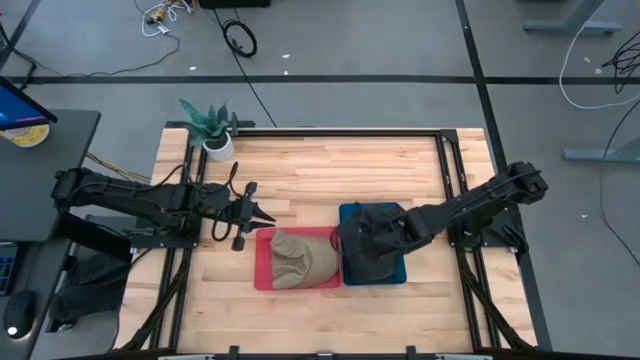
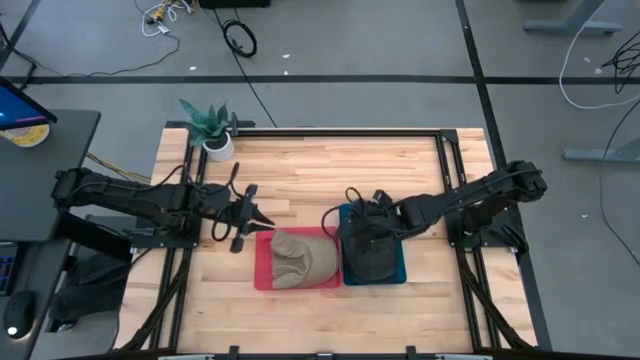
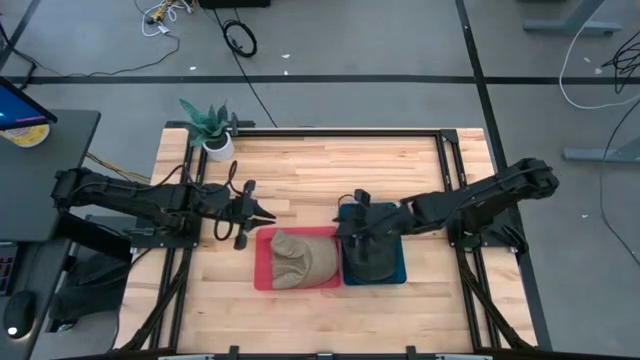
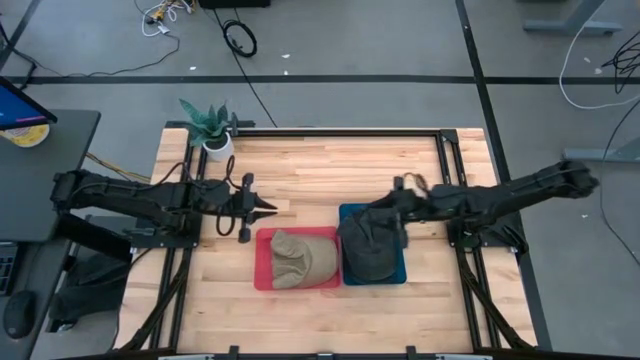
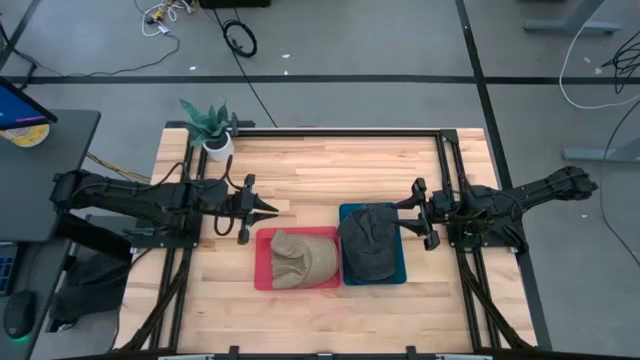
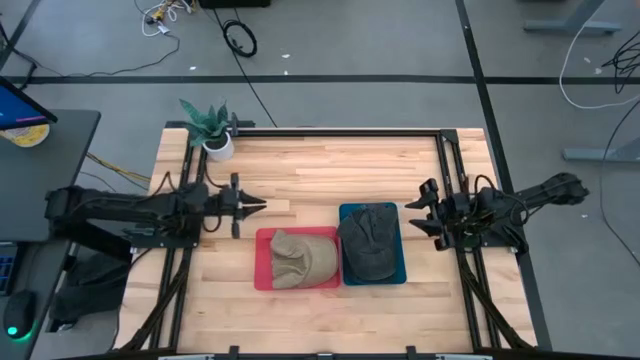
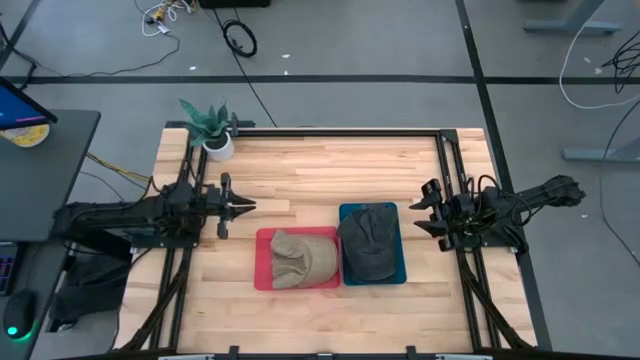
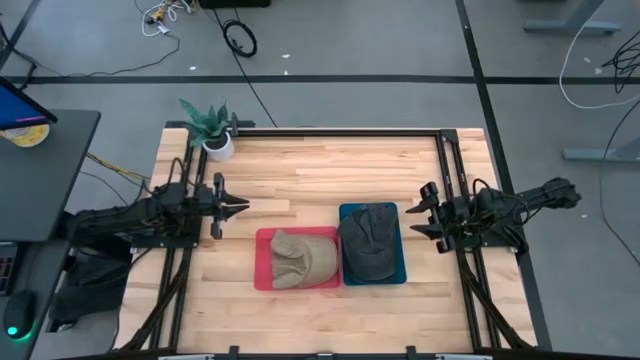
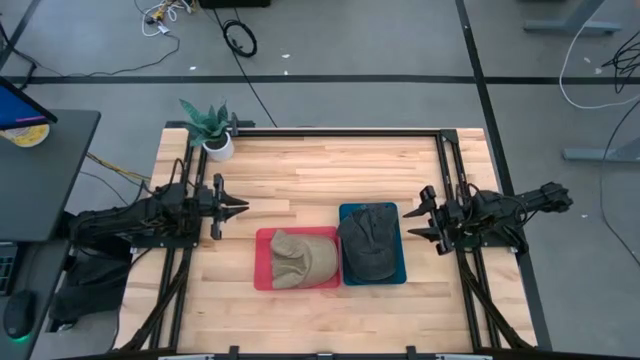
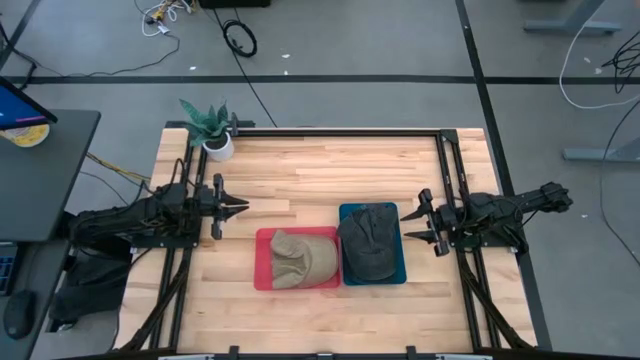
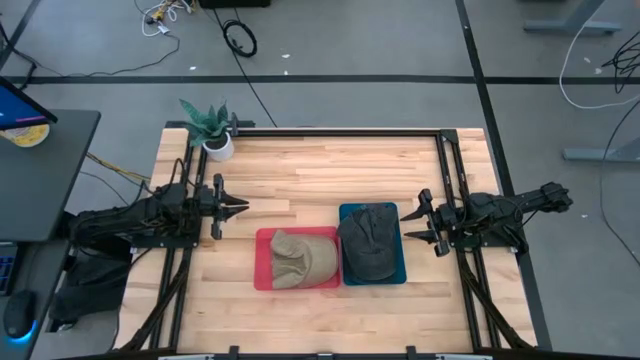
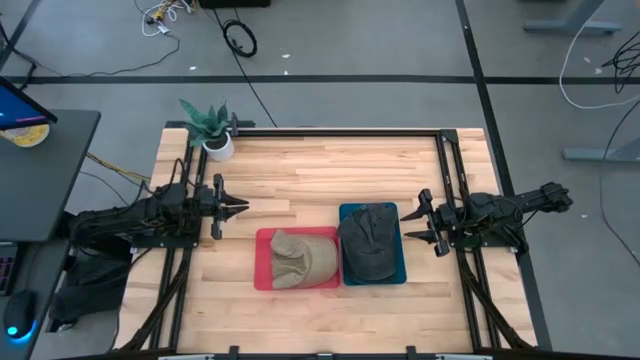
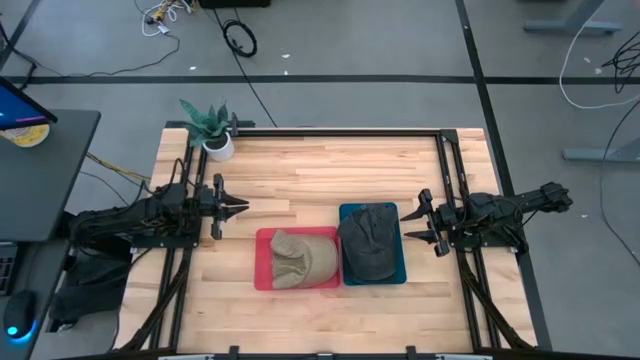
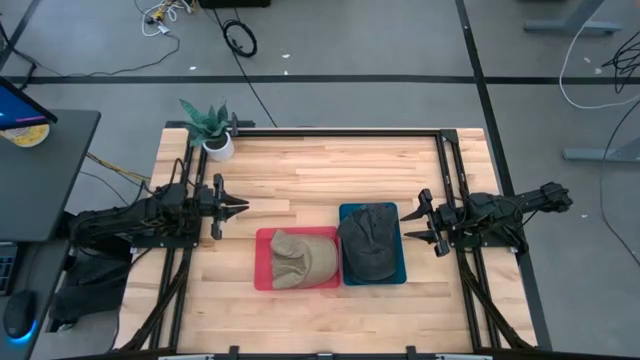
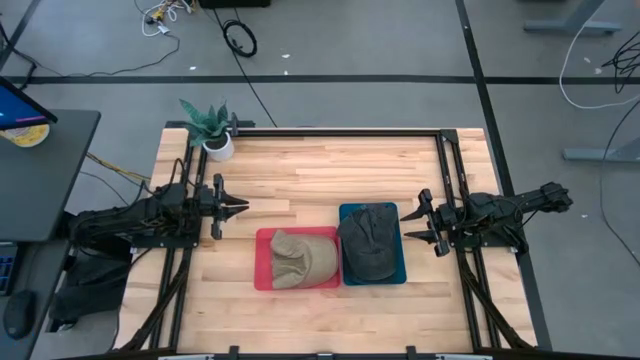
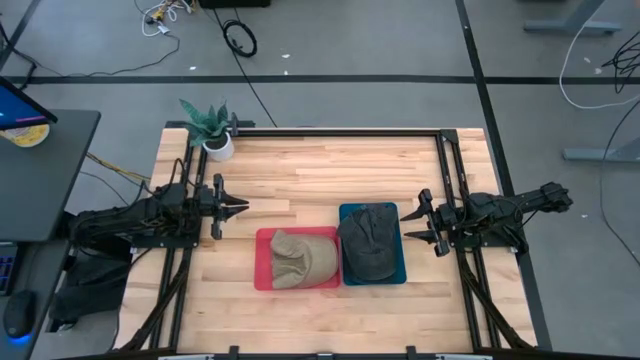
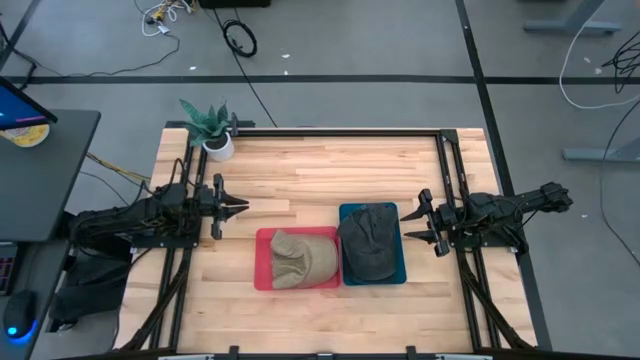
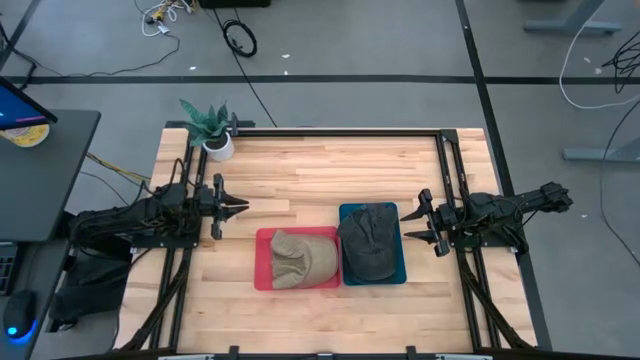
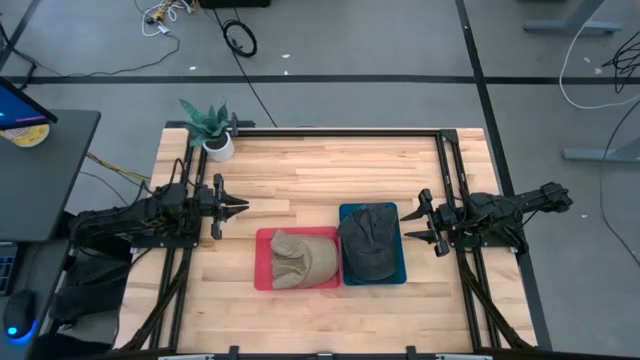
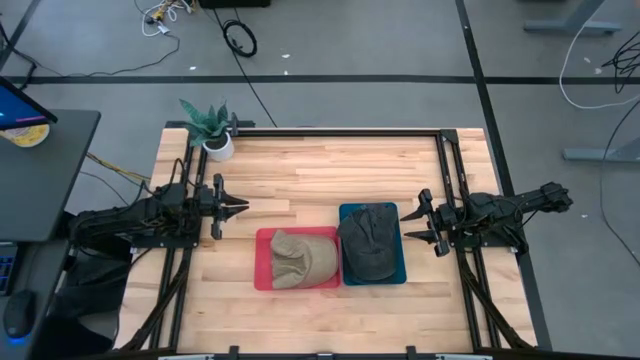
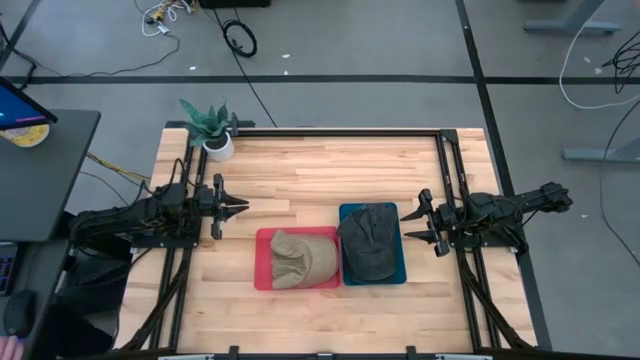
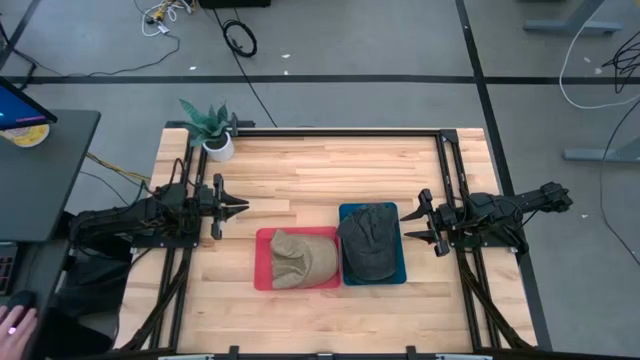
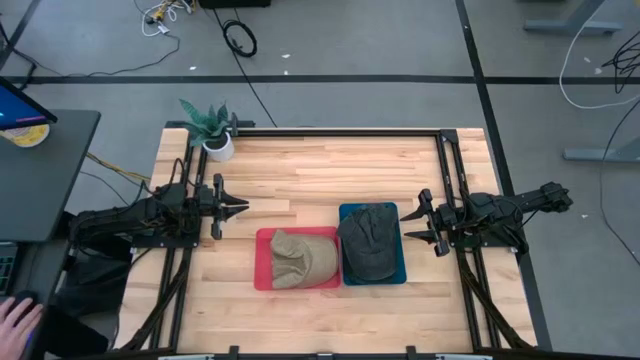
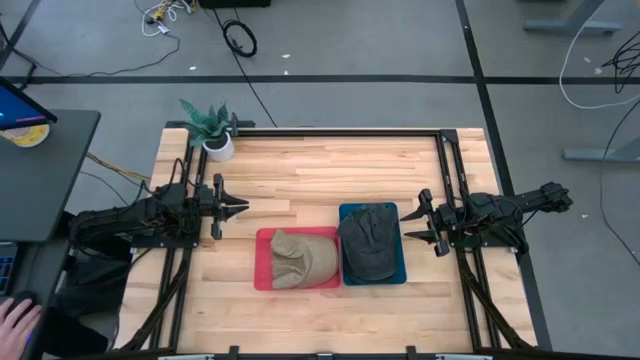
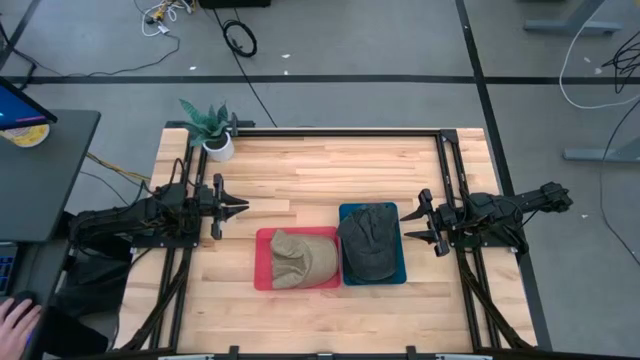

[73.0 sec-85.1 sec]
Task: Pick & Place hat
Return to Home Position

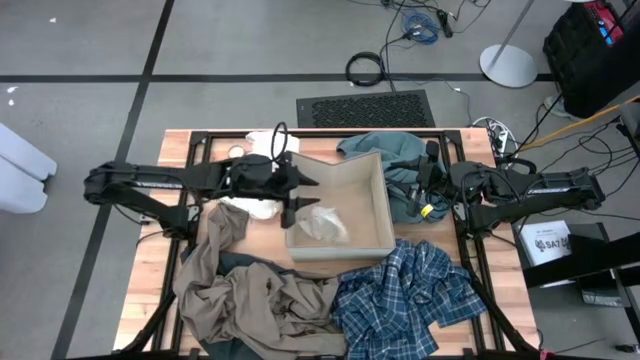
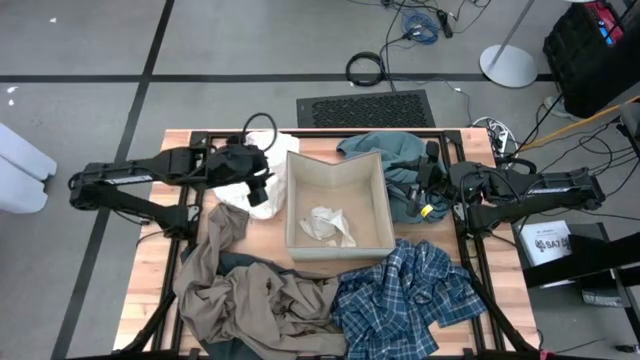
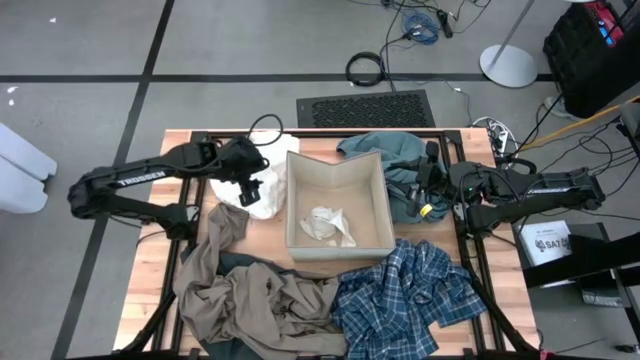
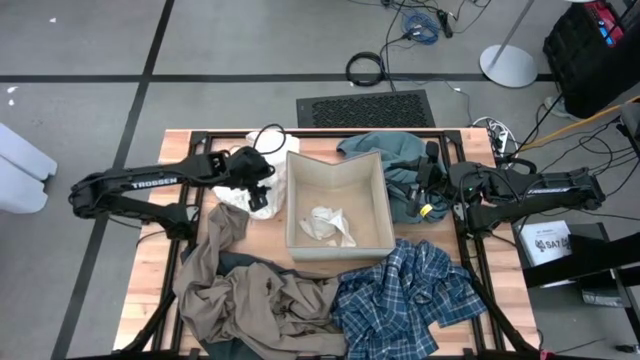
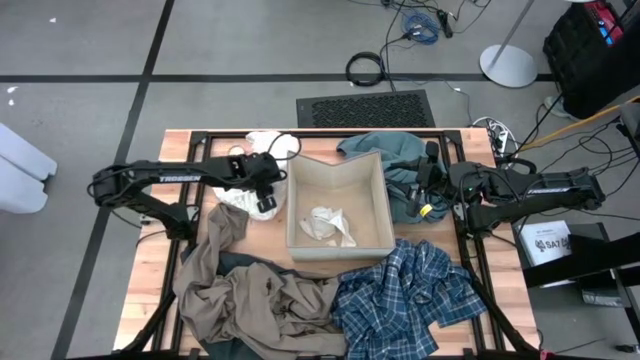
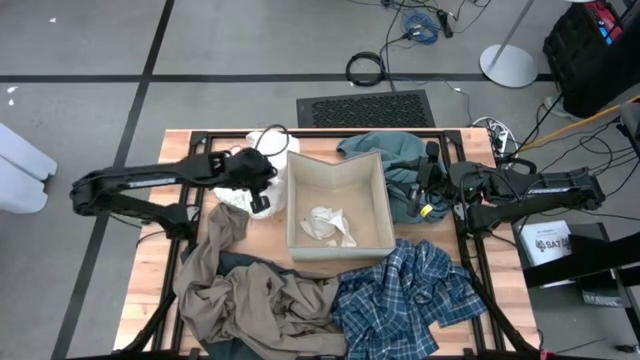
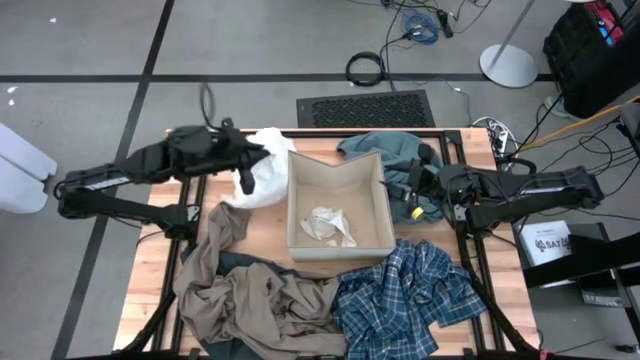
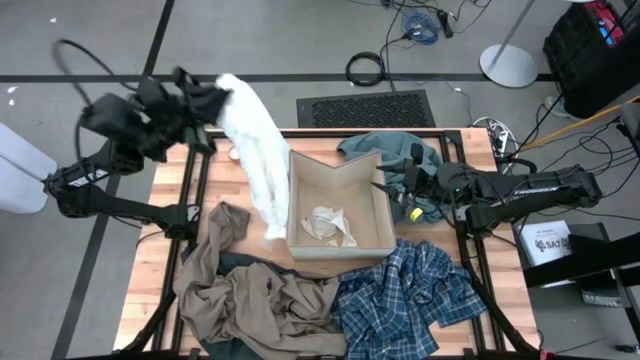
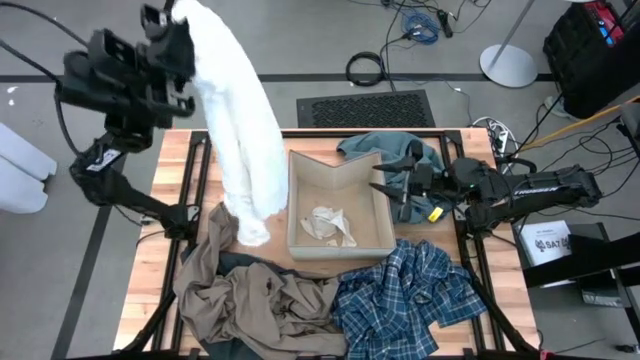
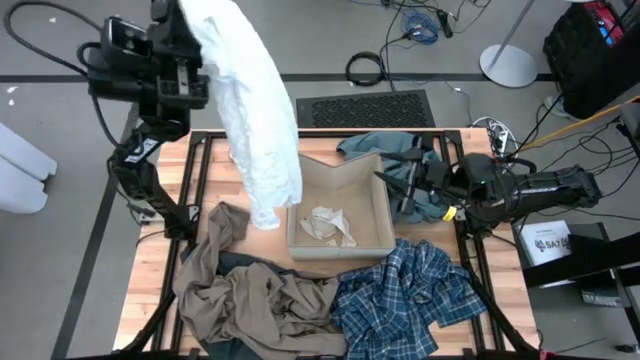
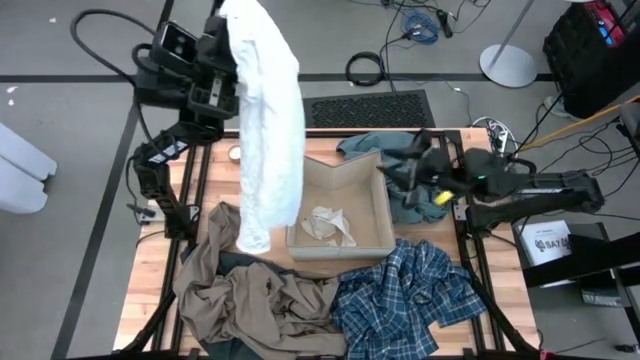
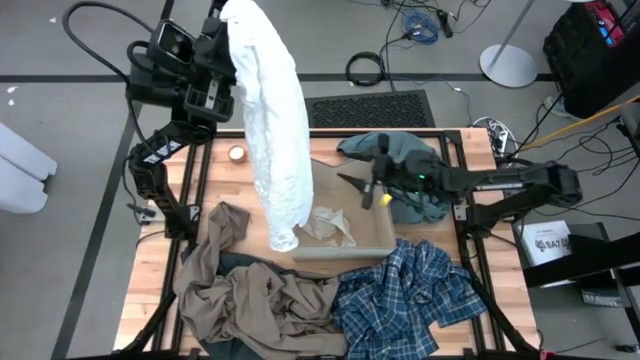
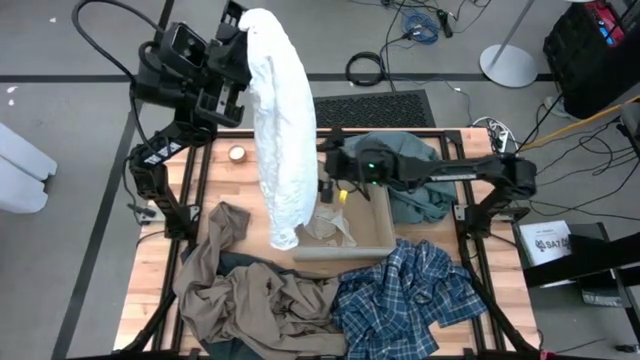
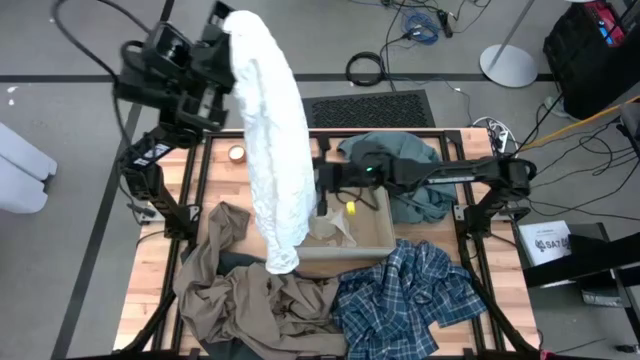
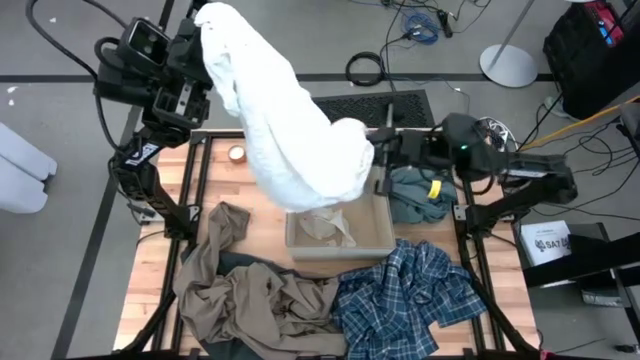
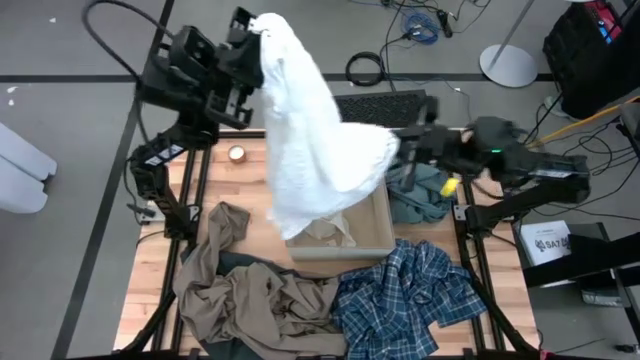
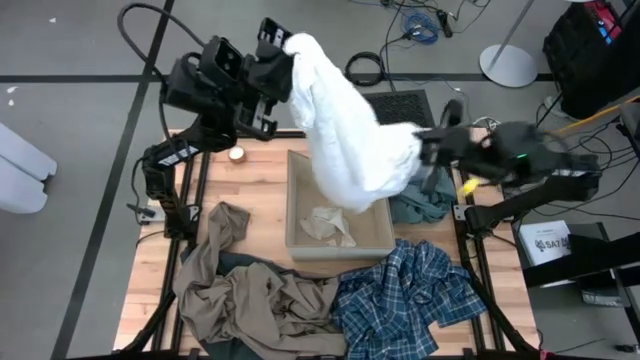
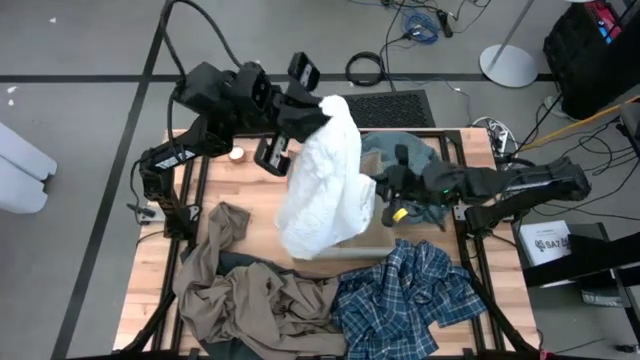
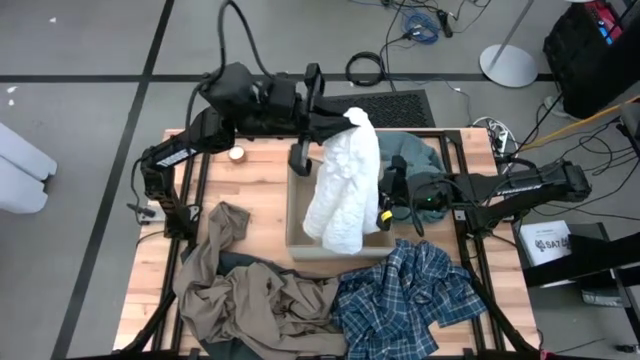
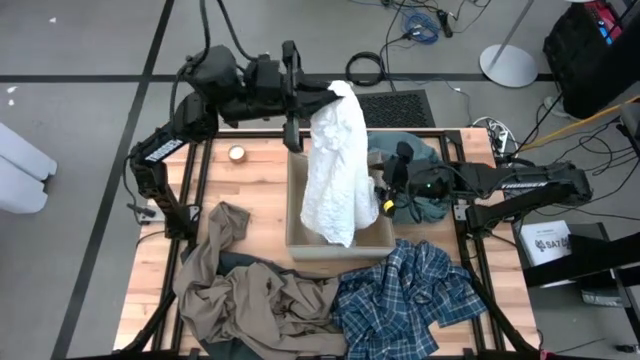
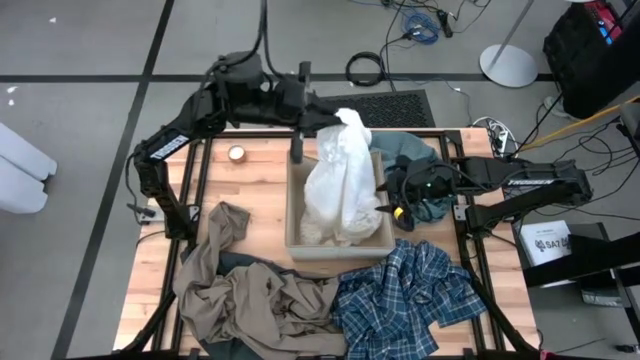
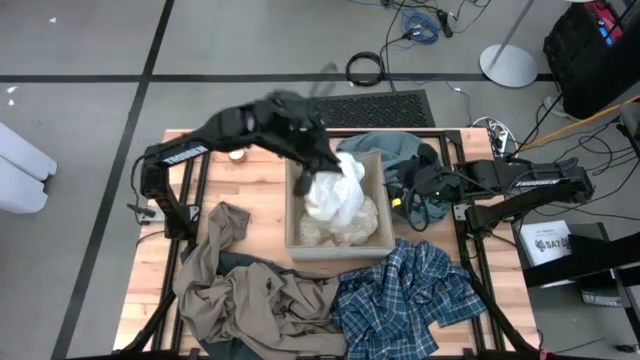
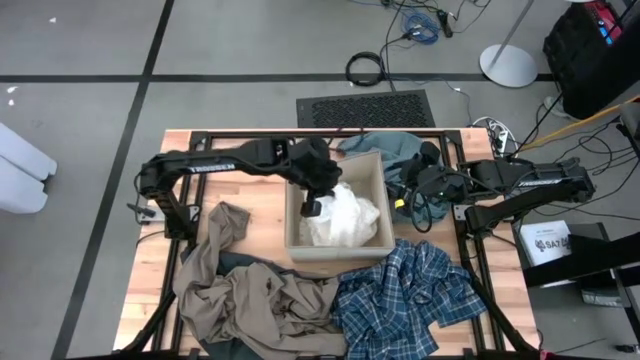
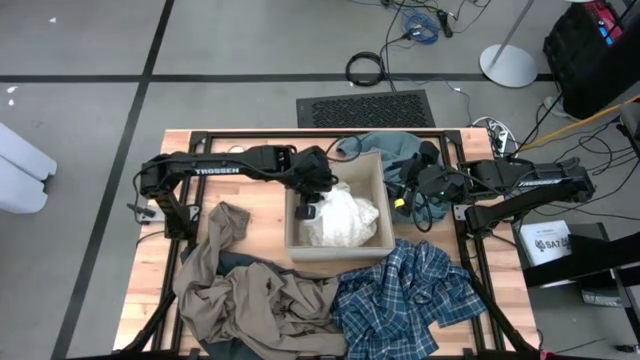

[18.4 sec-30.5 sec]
Task: Sort clothes
Put the white shirt into the white laundry bin
